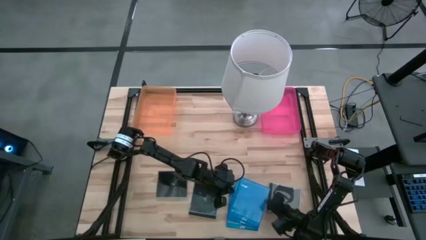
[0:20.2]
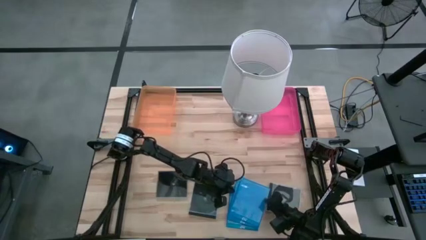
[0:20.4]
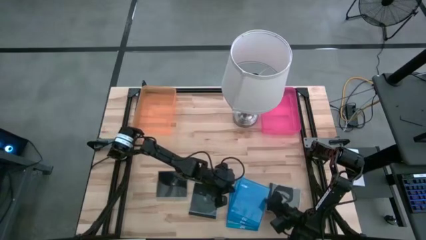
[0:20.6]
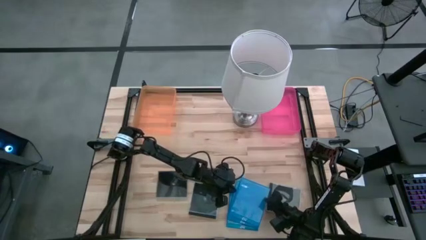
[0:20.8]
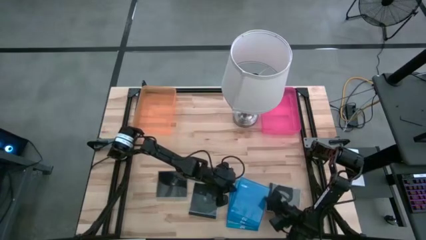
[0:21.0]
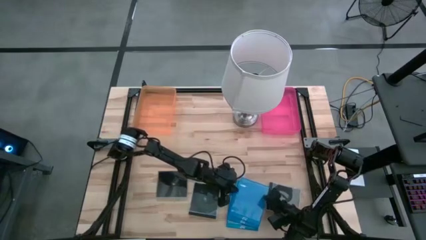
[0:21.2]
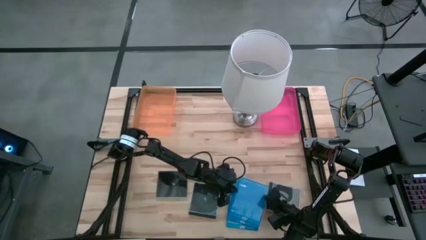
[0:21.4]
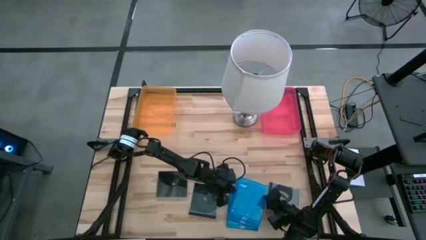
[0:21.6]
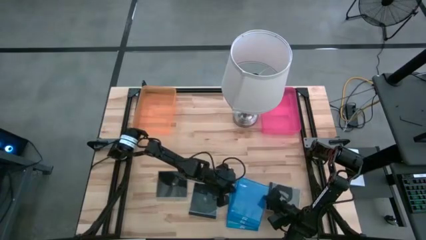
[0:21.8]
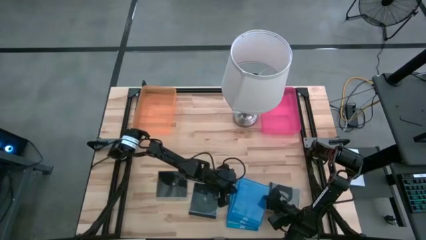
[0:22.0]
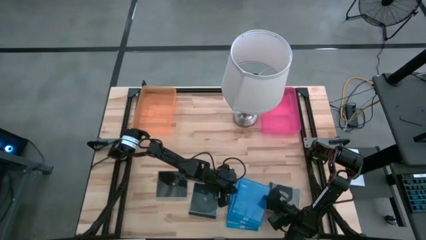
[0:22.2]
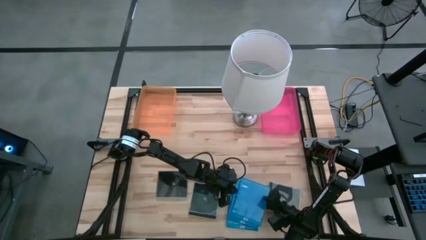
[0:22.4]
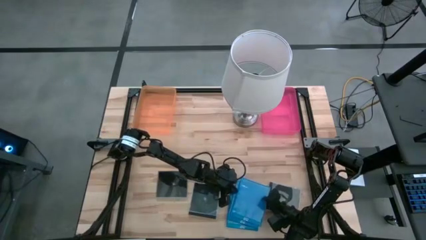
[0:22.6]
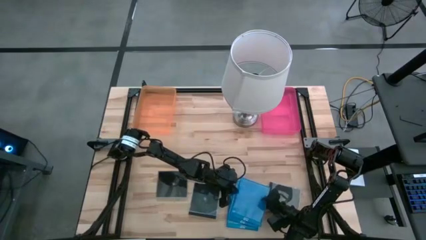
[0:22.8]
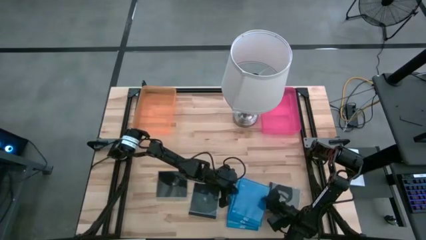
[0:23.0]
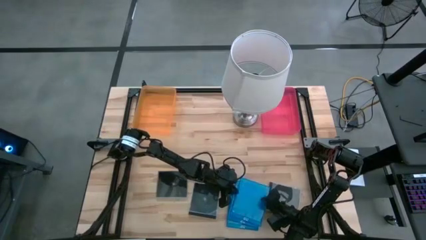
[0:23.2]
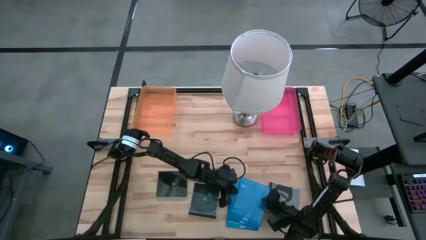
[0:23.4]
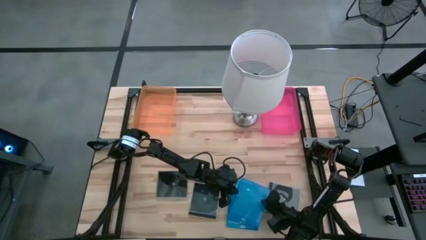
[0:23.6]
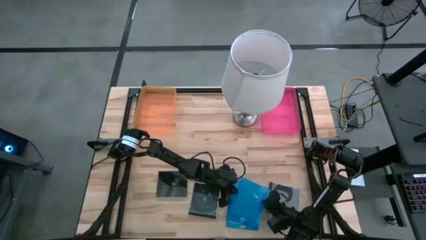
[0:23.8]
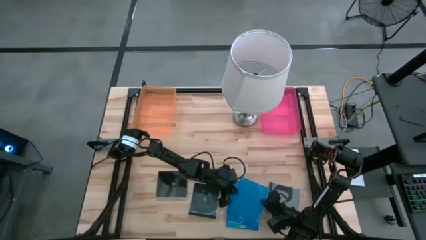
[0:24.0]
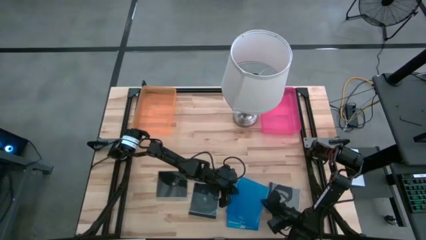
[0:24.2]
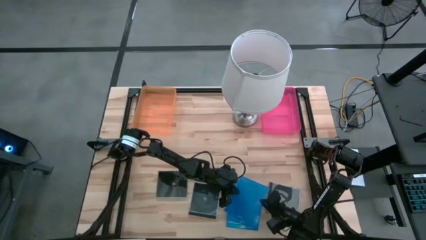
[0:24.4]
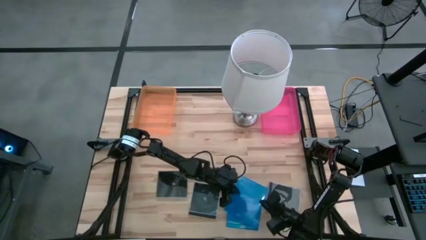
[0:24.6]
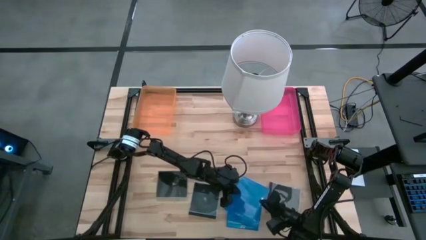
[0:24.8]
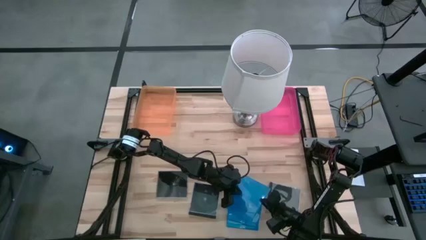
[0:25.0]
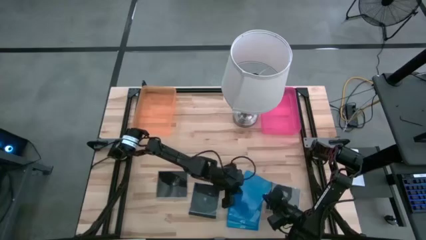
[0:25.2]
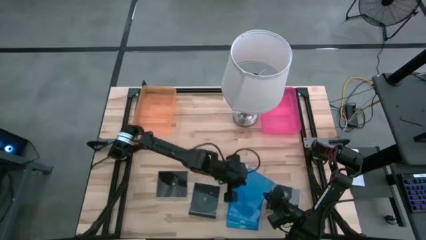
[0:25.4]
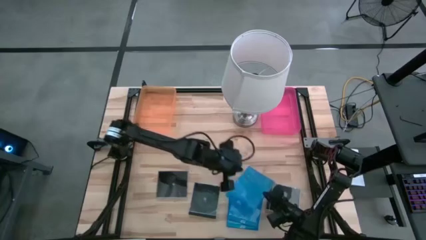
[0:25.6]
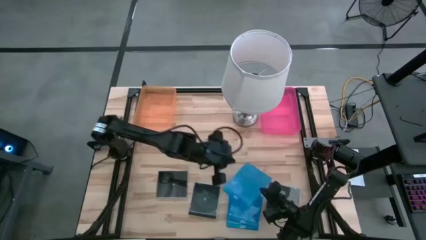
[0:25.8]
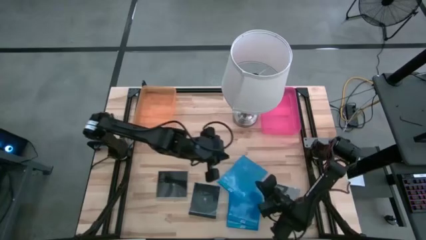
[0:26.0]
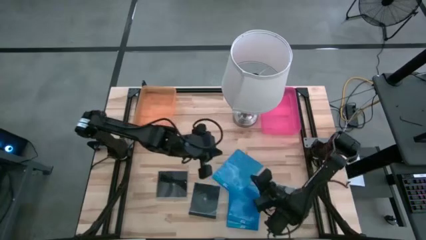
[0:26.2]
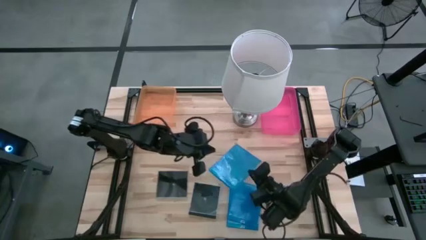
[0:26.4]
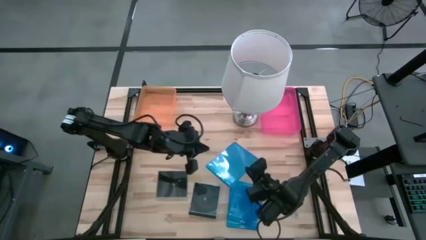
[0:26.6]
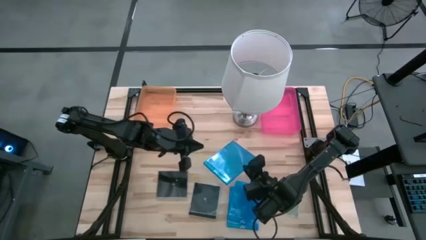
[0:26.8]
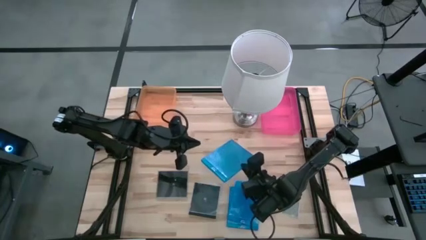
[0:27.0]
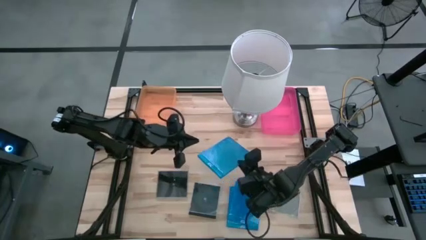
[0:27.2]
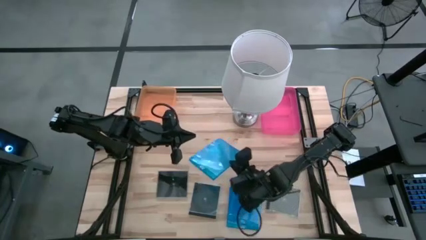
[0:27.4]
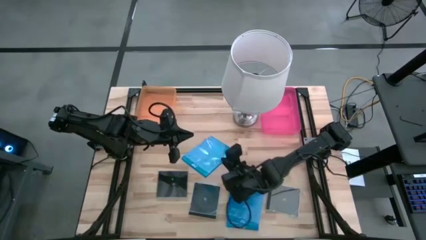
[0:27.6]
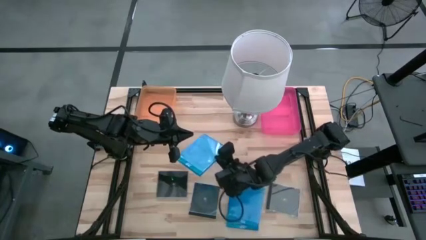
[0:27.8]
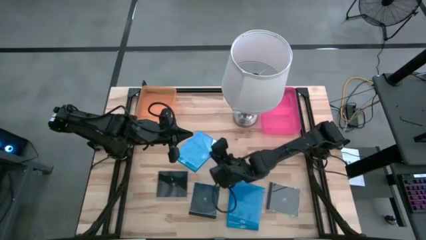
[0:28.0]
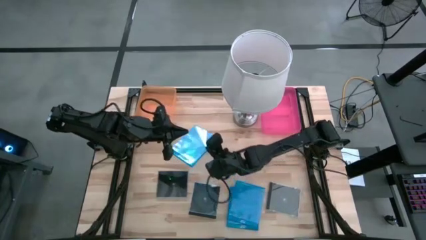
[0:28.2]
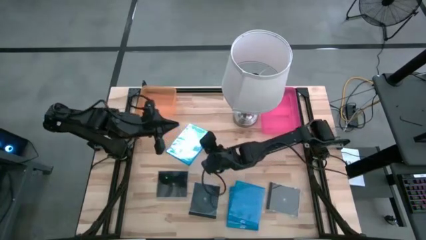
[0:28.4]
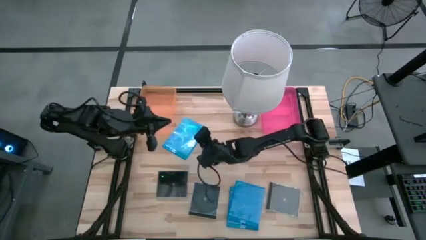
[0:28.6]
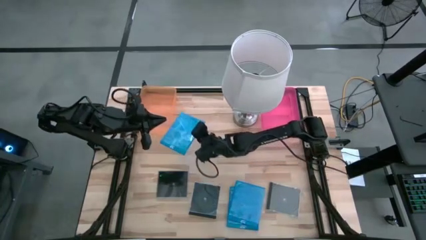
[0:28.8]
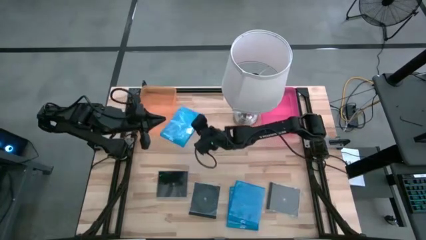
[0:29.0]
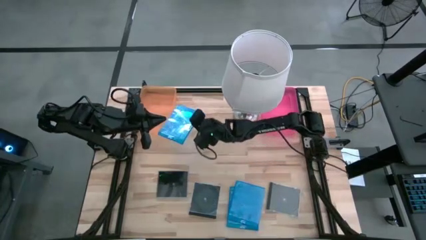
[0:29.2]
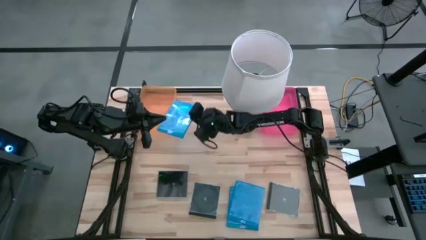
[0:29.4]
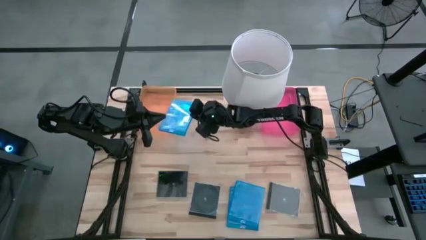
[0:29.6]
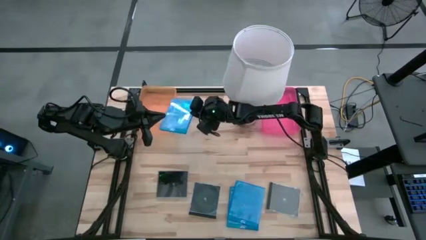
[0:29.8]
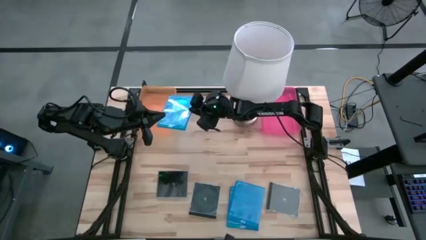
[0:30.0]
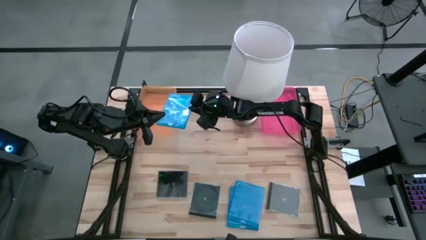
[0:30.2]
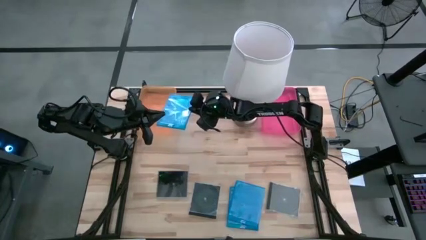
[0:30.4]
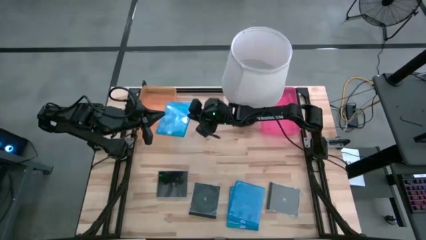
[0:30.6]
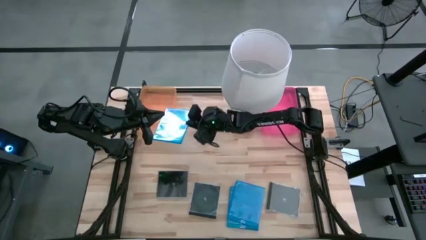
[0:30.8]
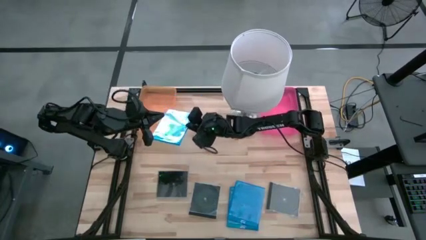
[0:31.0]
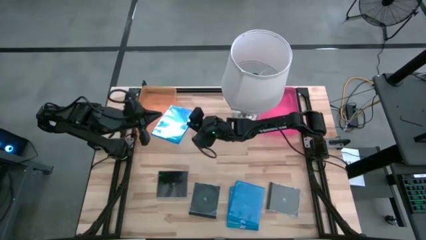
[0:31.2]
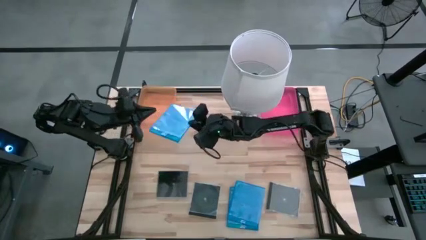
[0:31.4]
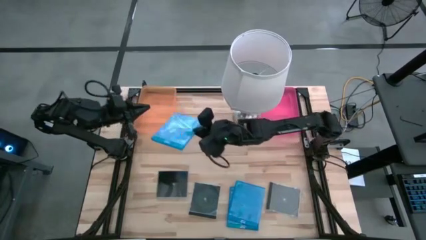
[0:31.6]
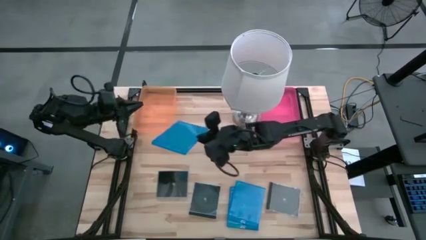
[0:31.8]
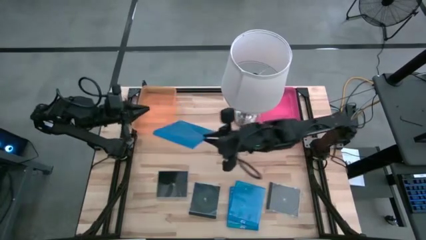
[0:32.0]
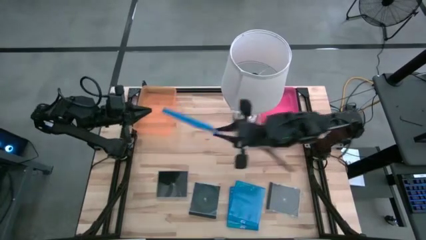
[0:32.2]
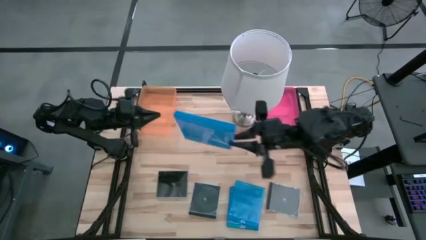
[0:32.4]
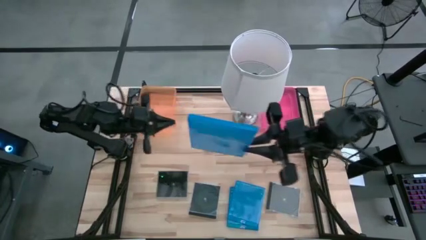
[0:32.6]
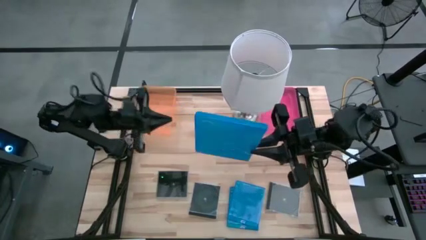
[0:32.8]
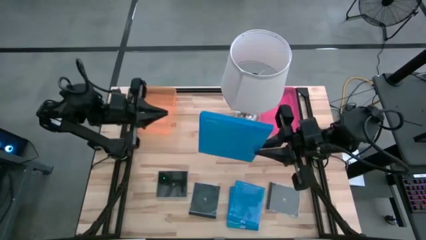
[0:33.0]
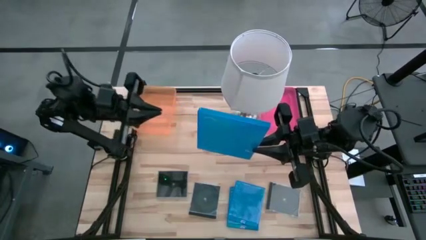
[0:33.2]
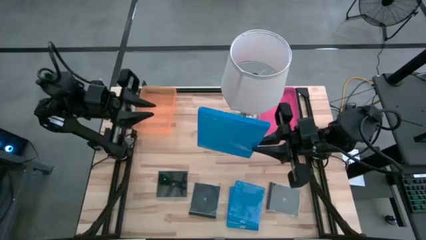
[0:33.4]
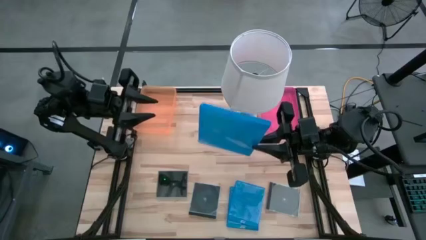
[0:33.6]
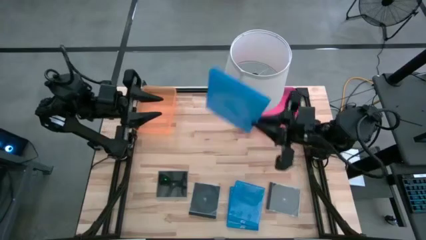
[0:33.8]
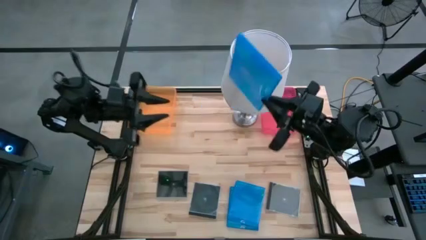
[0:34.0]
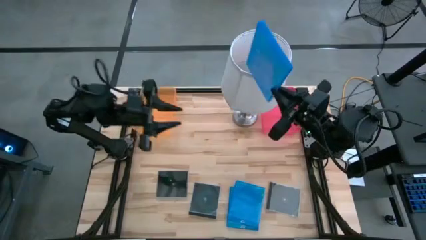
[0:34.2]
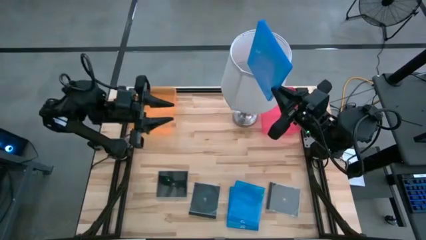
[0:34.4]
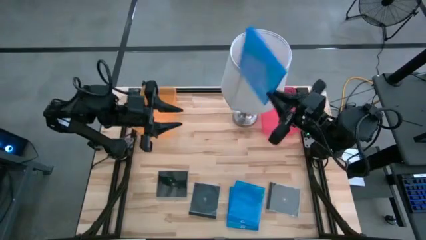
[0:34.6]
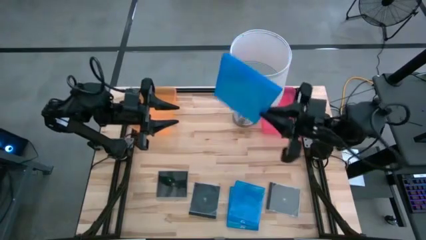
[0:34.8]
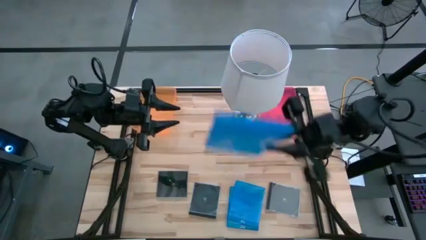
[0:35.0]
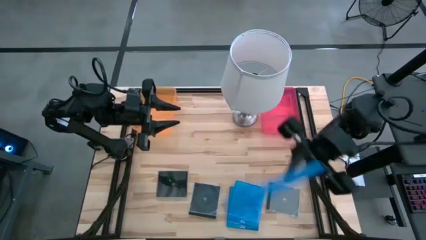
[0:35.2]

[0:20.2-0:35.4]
Task: Pick & place jewel cases by type
Put the blue cd case into the orange bin
